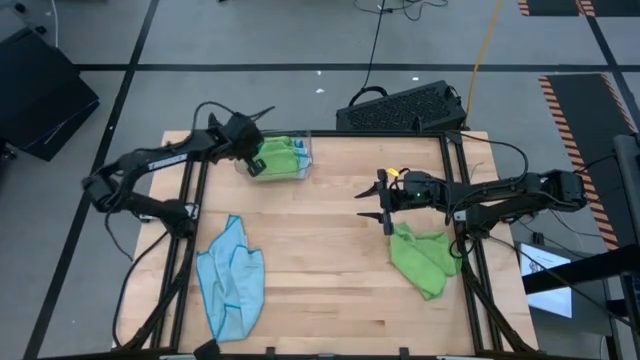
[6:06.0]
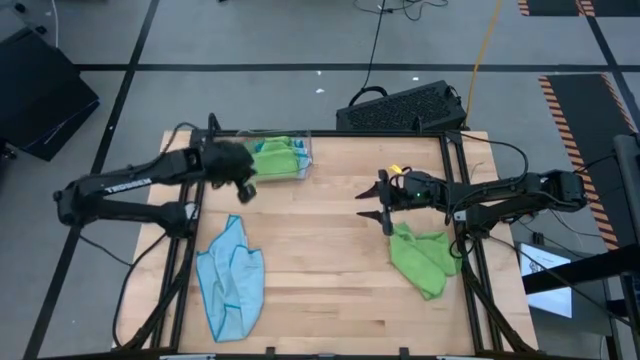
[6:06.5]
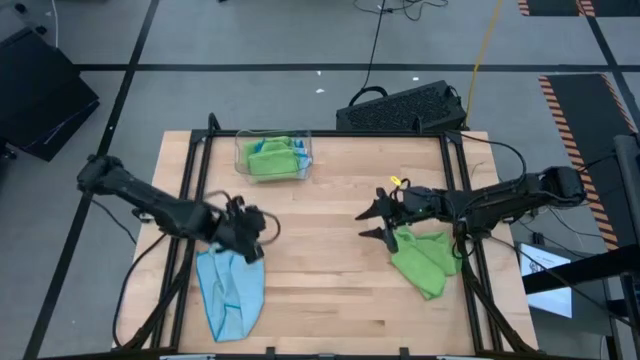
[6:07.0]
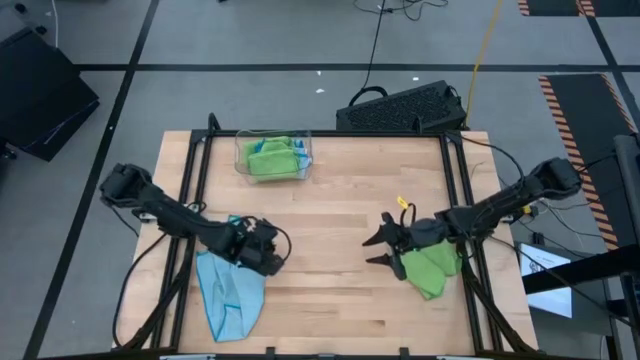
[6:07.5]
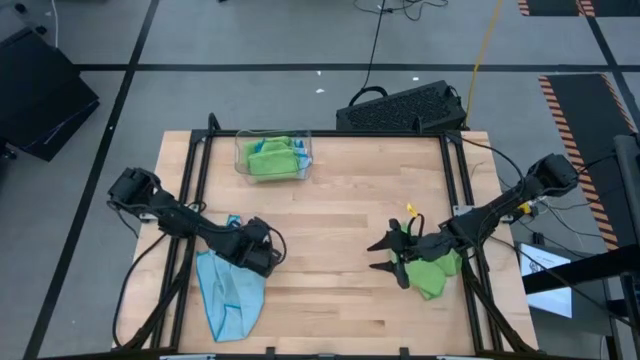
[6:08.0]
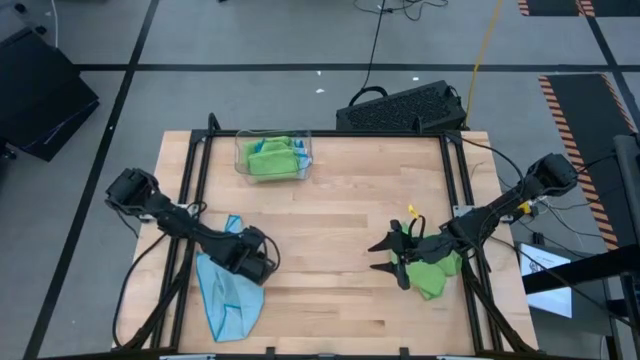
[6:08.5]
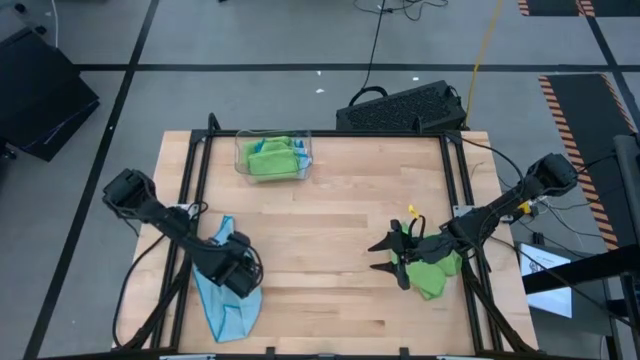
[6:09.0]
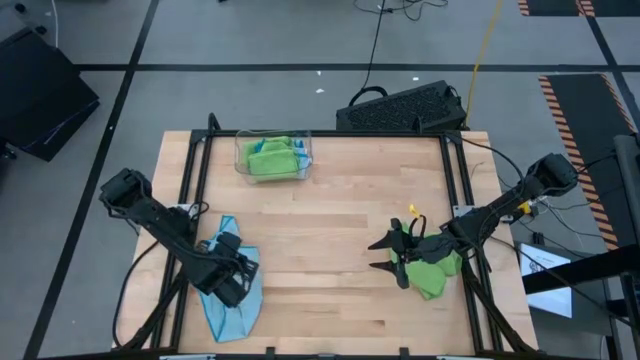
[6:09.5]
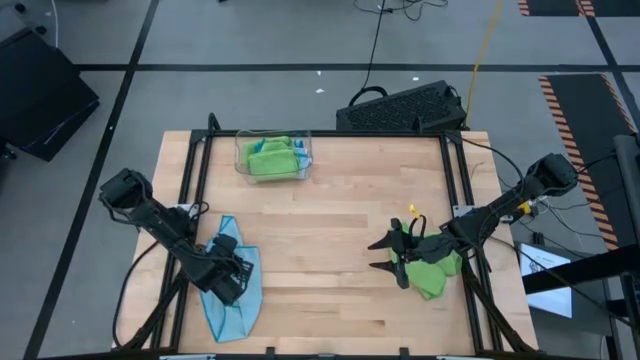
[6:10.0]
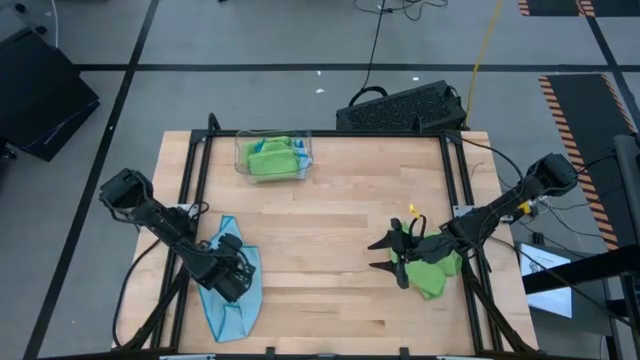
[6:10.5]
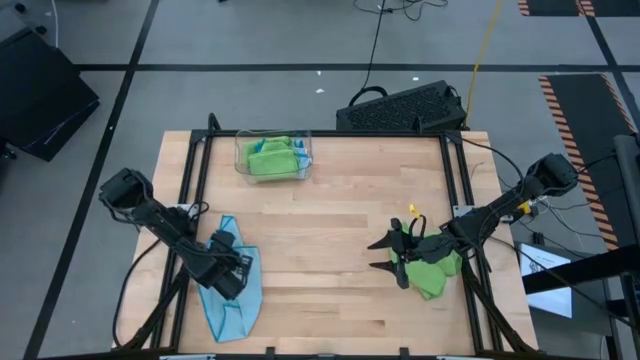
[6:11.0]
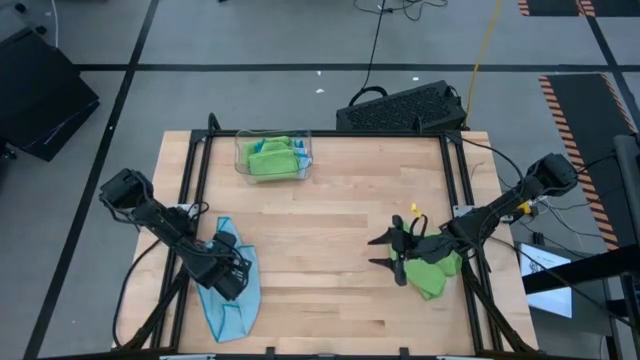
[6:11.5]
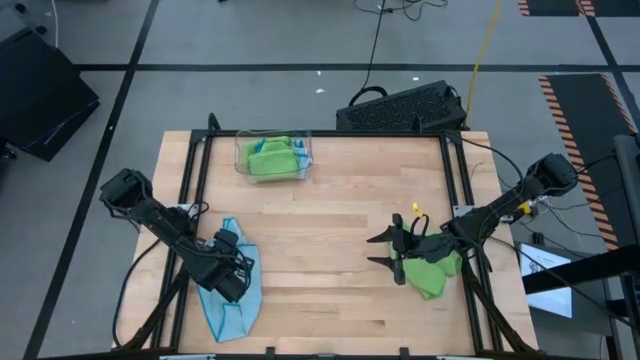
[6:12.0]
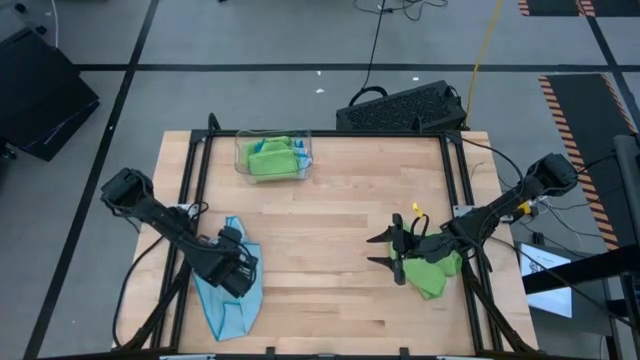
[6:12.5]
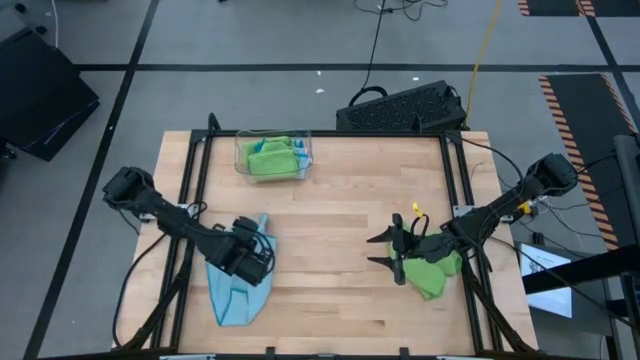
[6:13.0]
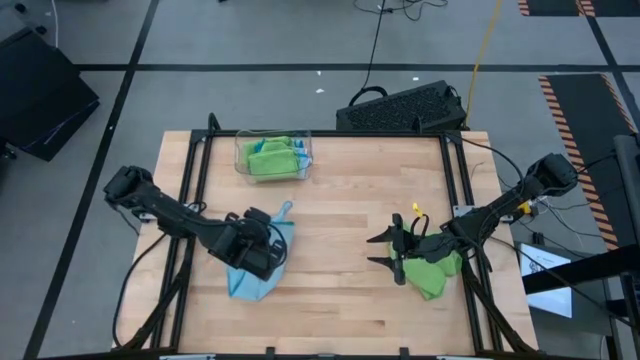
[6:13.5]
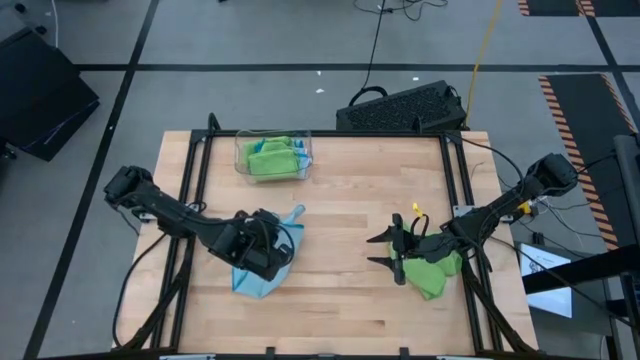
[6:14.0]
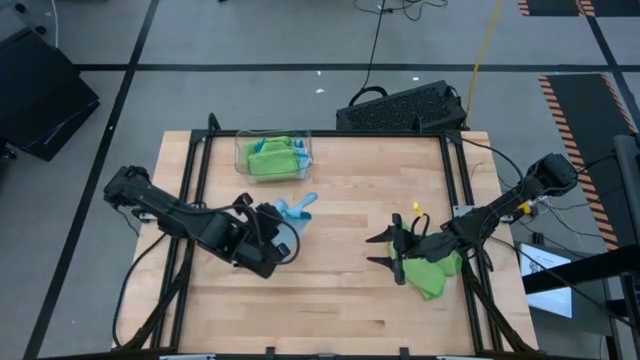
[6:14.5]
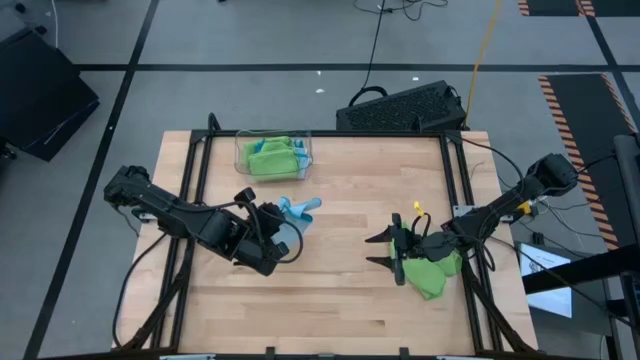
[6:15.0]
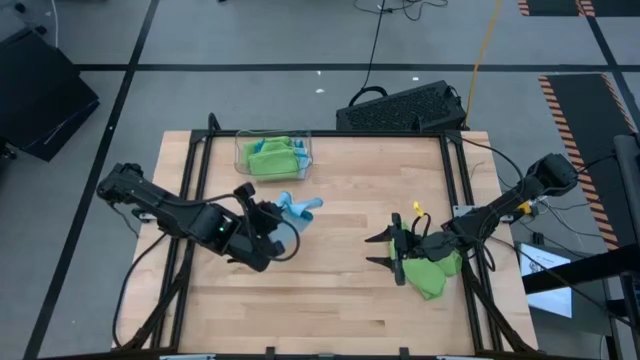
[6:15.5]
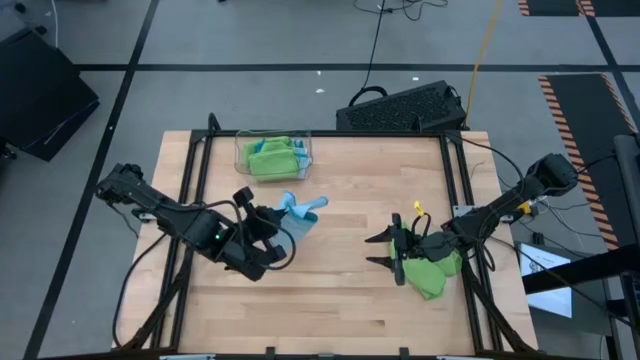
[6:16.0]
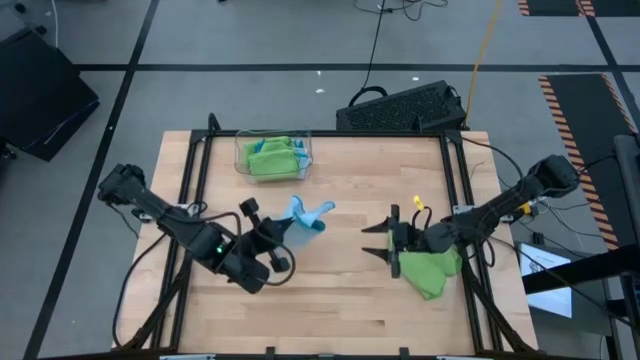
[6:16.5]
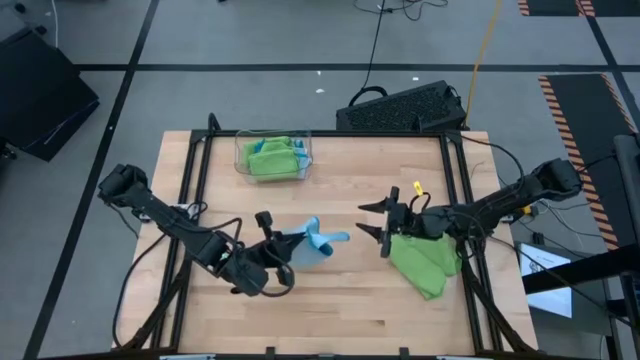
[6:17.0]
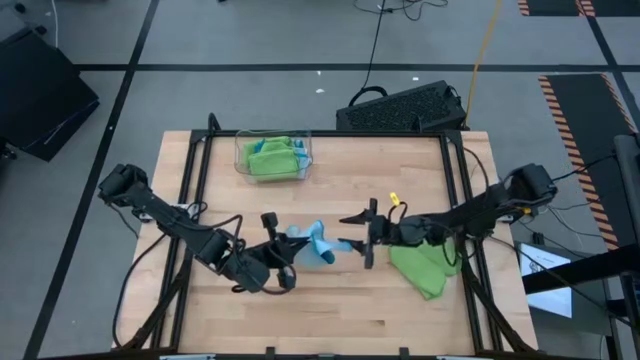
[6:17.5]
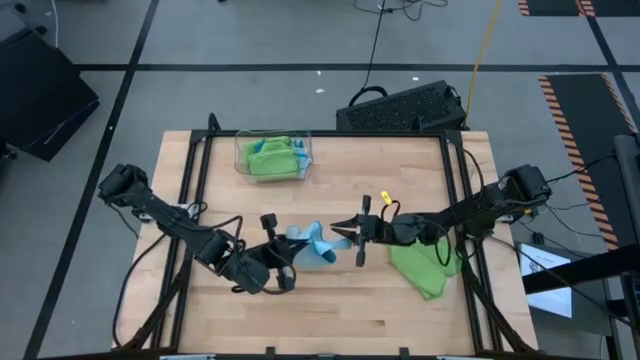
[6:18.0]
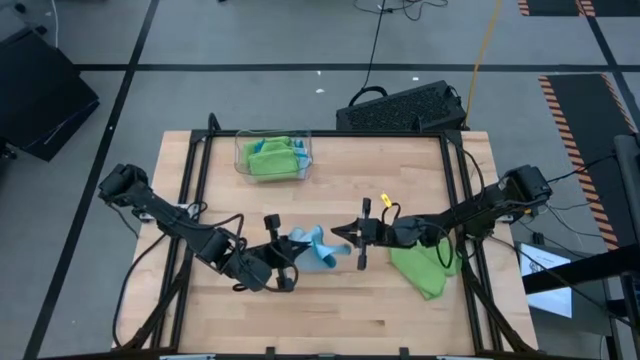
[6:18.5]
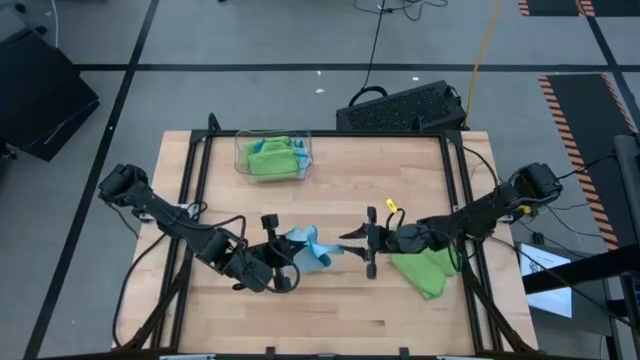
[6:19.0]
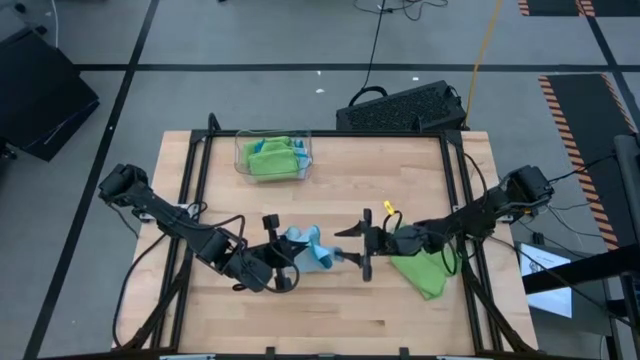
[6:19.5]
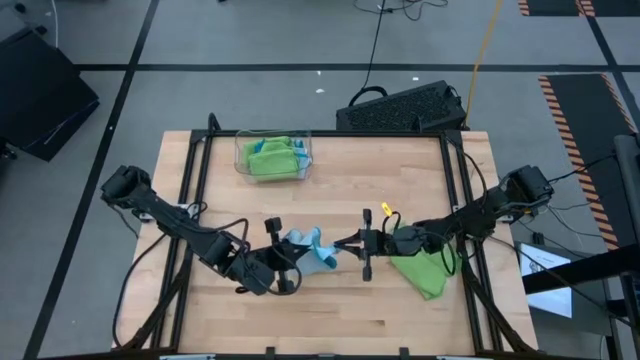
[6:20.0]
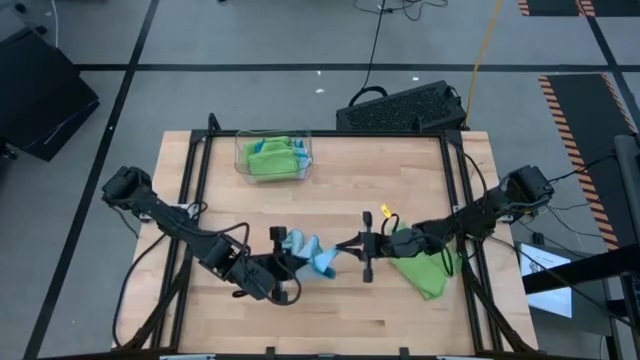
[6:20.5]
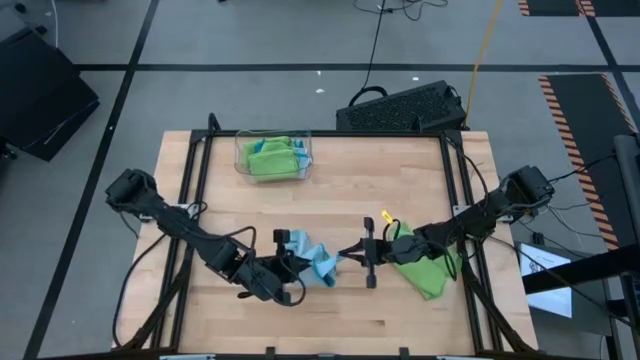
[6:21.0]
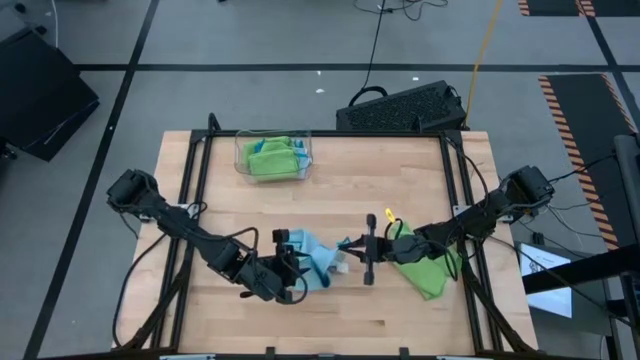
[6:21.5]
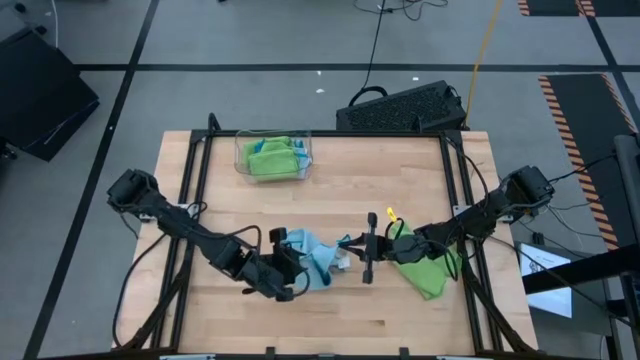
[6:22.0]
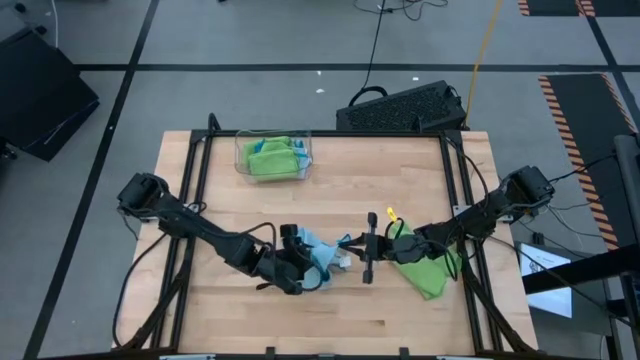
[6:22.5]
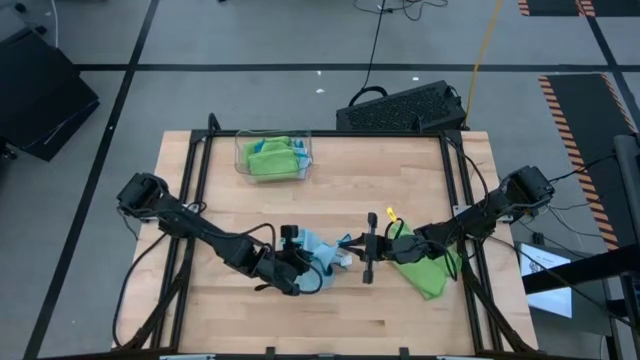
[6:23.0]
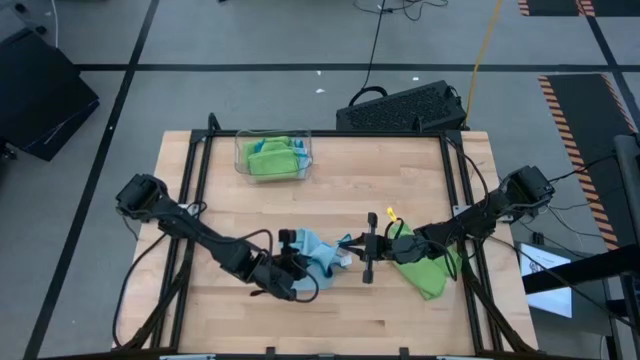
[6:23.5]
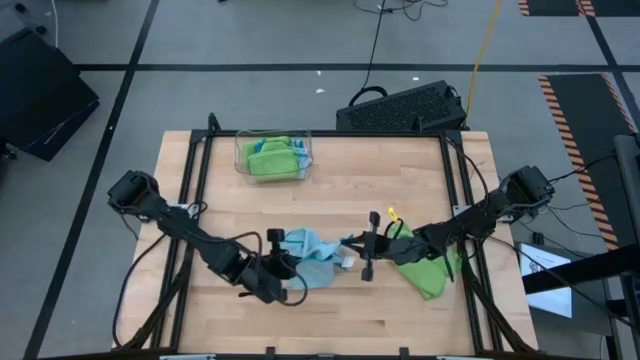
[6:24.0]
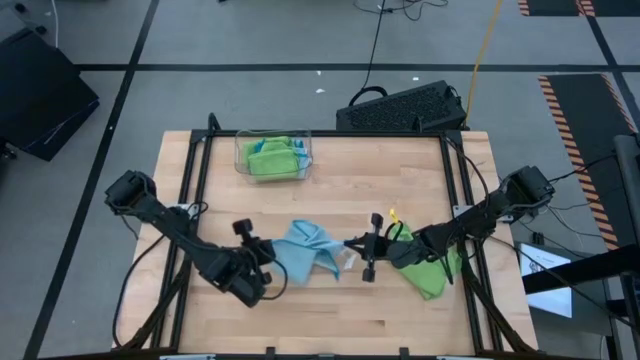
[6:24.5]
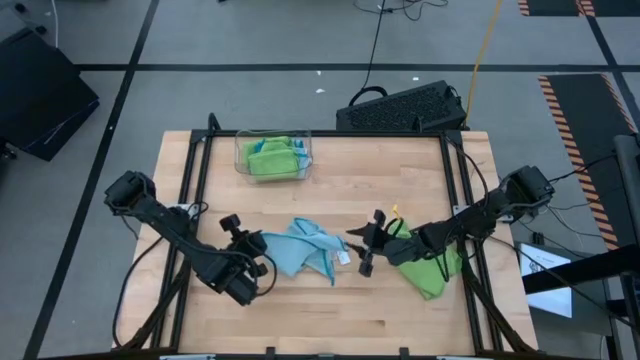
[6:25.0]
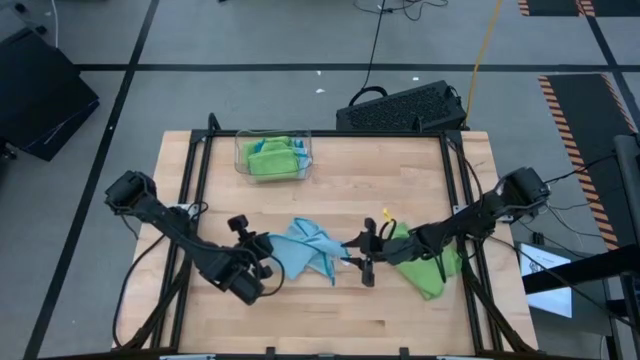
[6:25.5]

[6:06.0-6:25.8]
Task: Fold microfiber towels
Fold the blue microfiber cloth

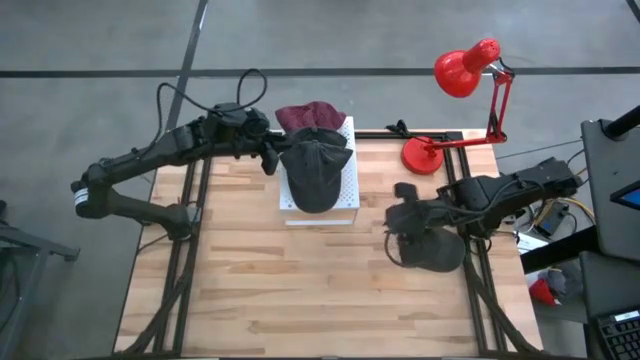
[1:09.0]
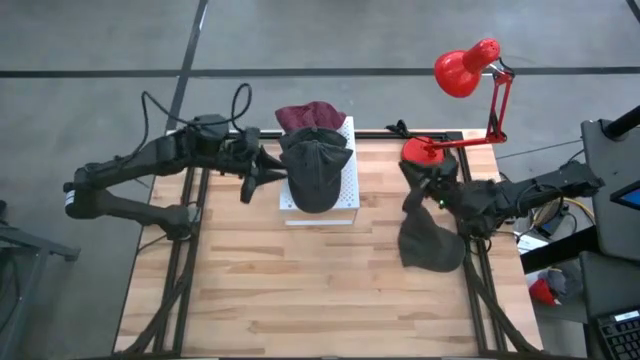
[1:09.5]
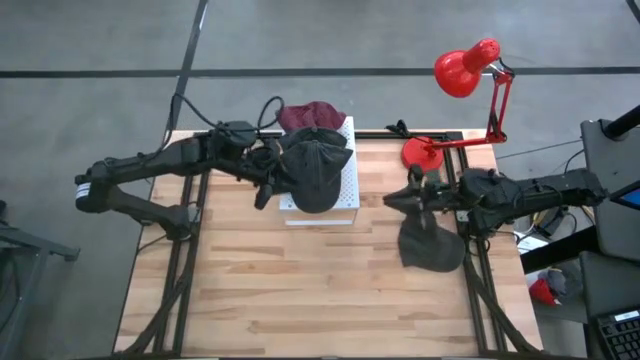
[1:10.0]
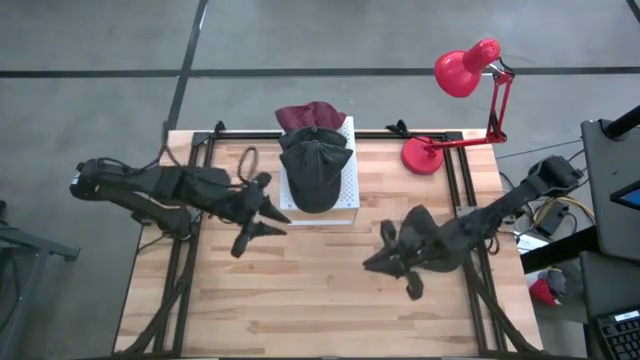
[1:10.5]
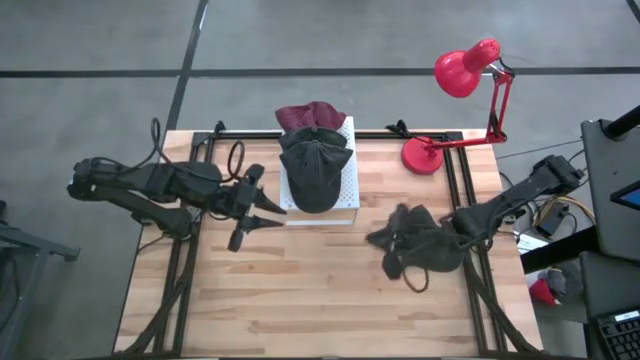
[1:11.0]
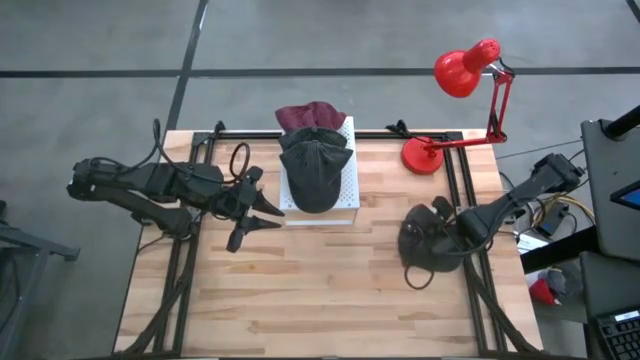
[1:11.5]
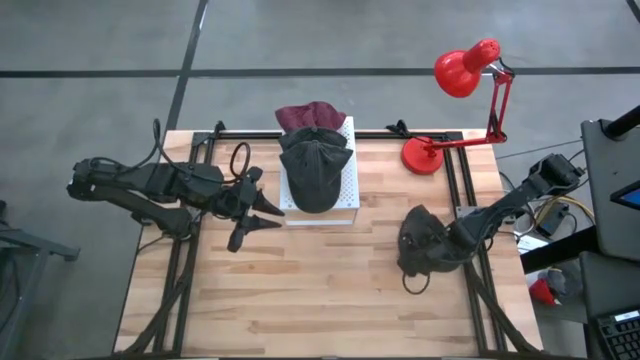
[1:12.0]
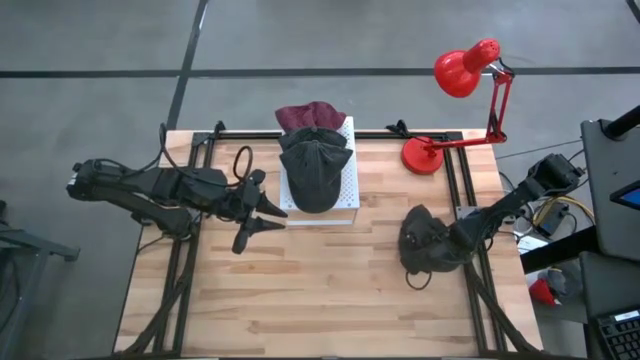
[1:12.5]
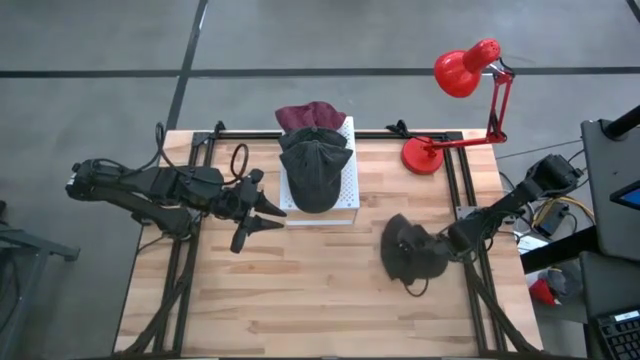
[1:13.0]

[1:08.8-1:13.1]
Task: Pick & Place hat
Stack the black cap on the black caps on the shelf
